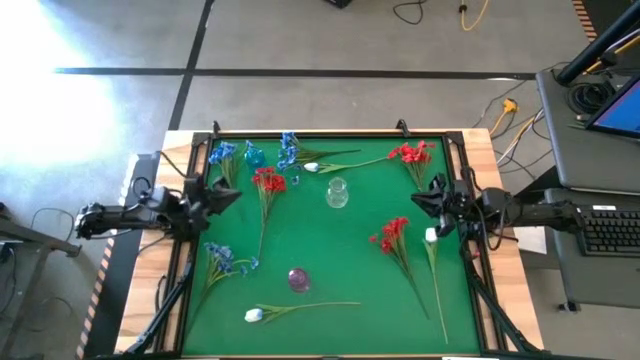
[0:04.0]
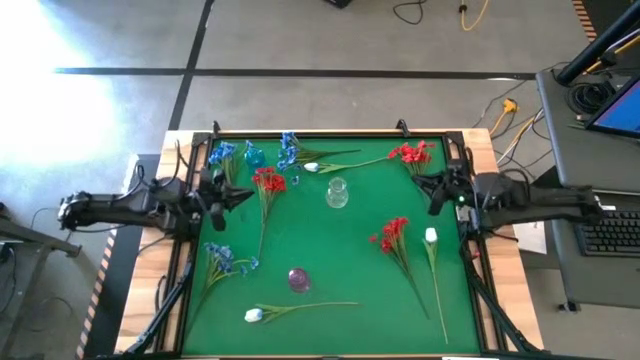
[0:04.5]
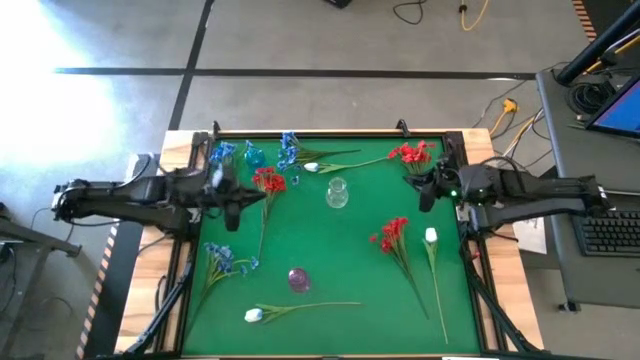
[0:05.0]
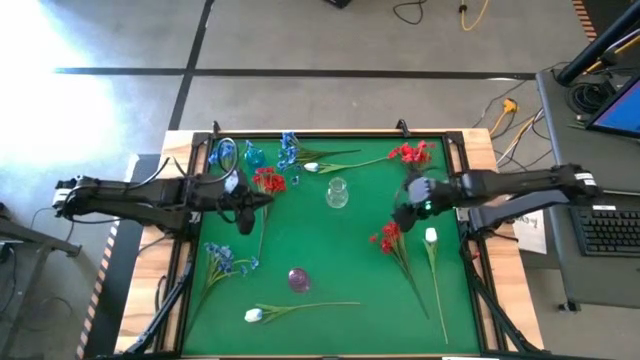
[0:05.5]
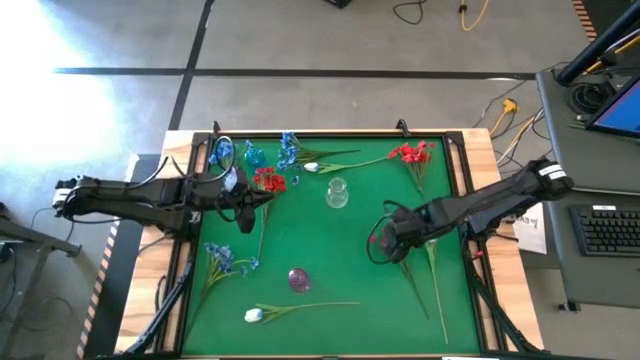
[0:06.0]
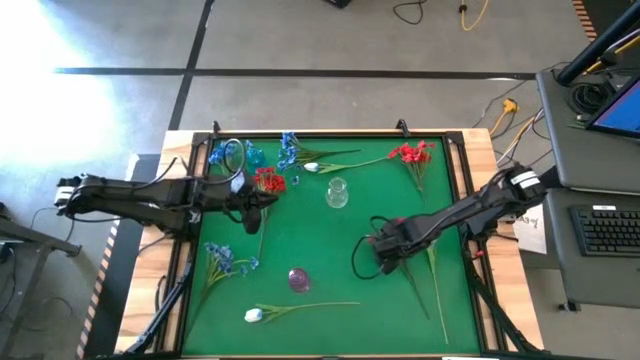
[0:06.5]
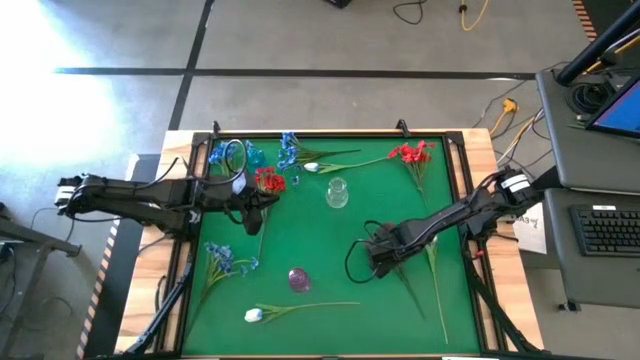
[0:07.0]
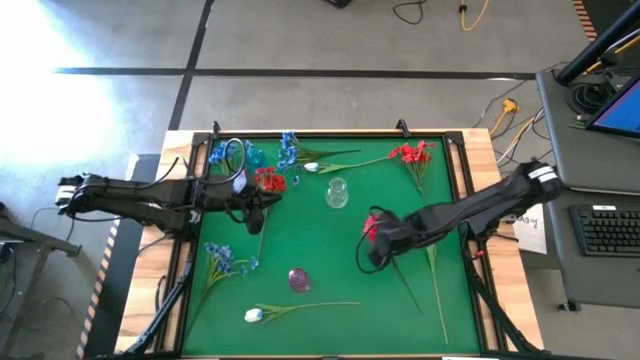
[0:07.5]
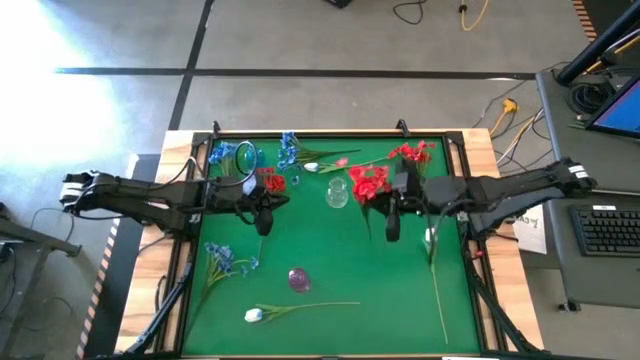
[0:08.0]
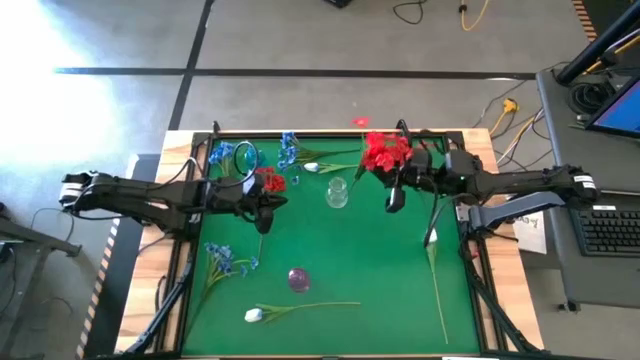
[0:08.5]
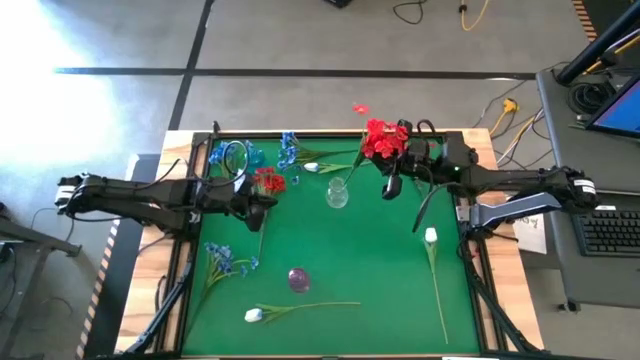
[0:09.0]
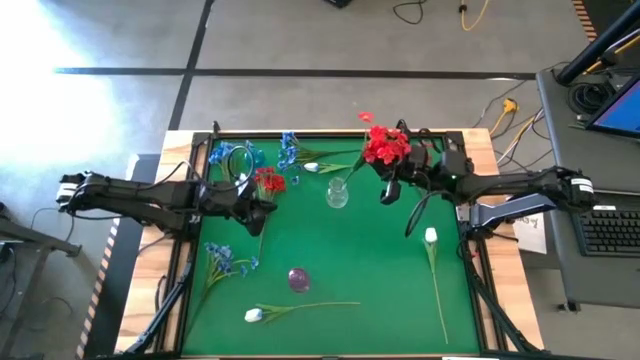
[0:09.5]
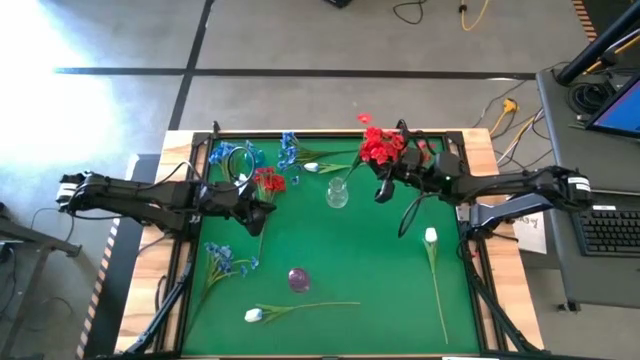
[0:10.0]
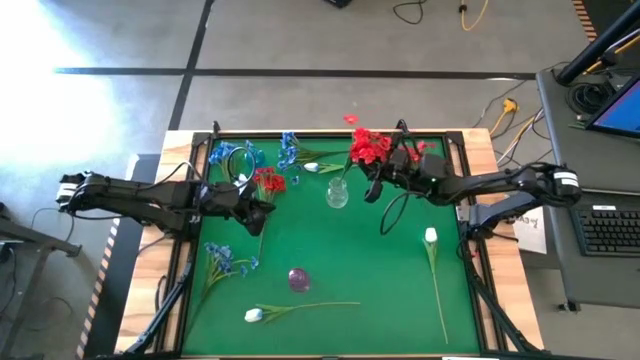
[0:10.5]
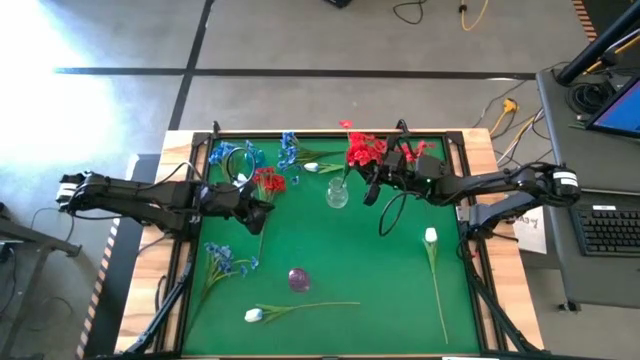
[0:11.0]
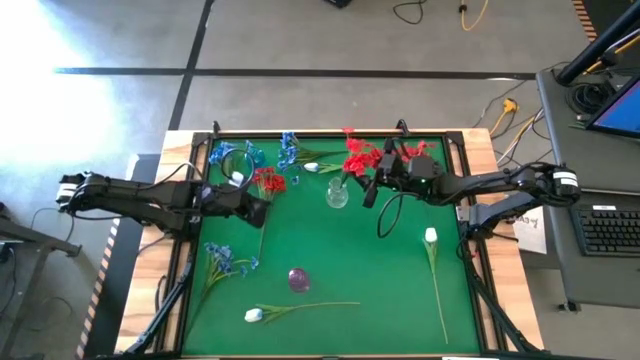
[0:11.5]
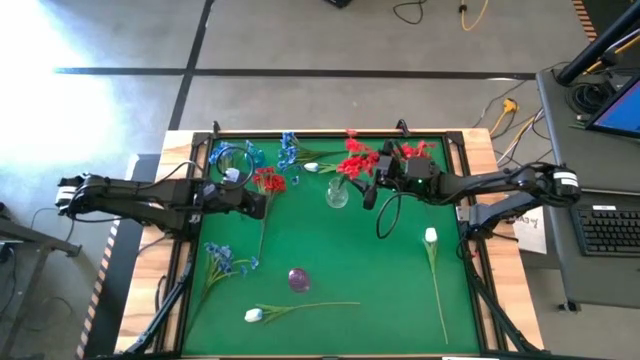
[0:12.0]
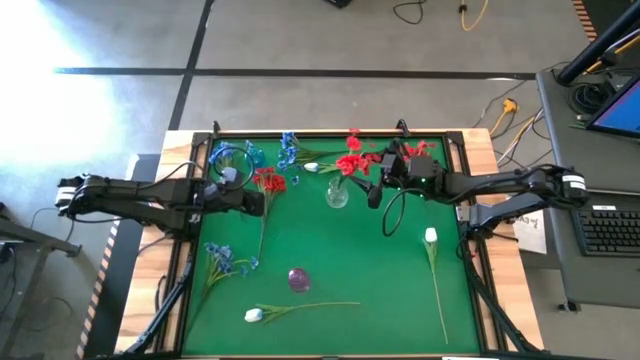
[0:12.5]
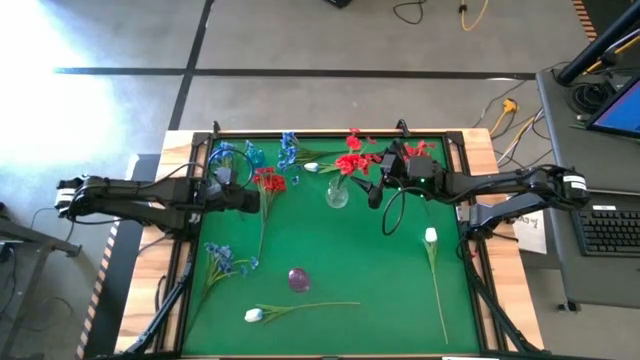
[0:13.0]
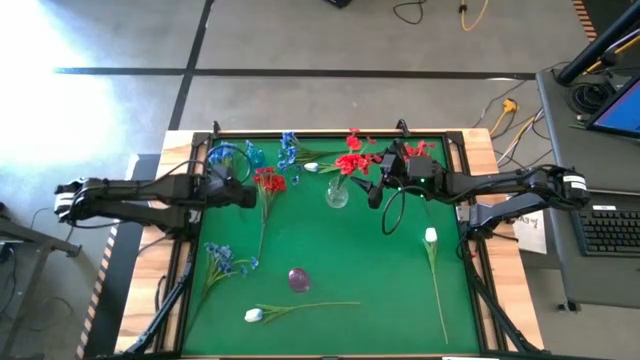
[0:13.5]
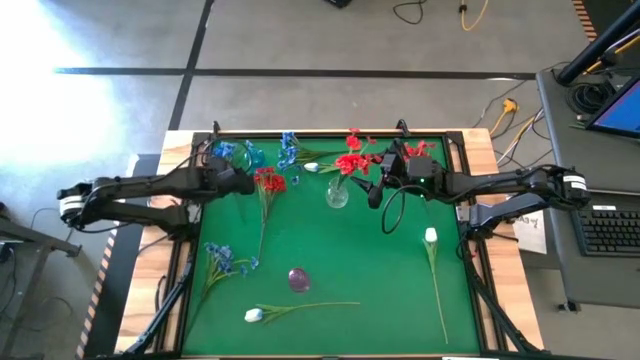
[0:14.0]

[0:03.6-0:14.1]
Task: Sort flowers into vase by color
Put the bottom red flowers into the transparent vase

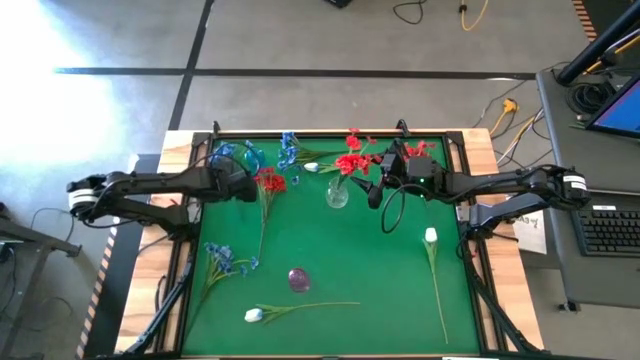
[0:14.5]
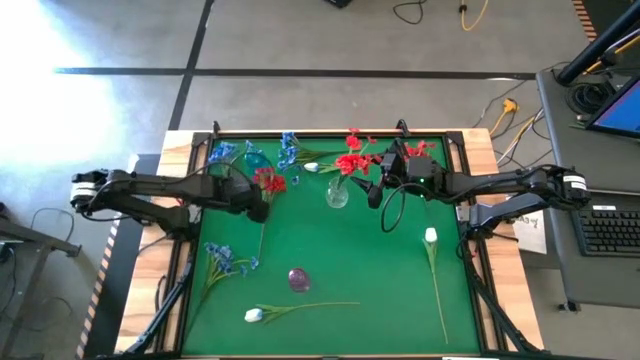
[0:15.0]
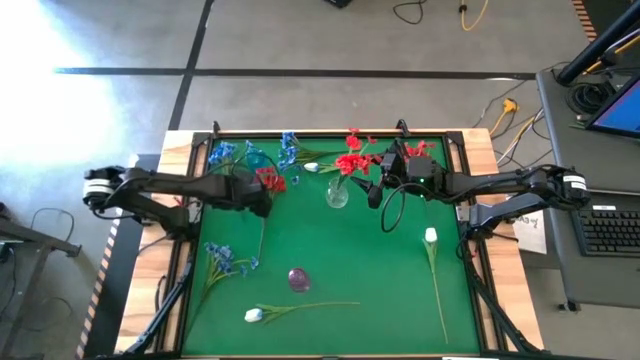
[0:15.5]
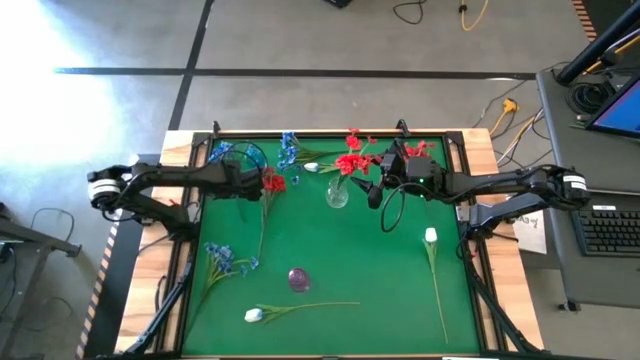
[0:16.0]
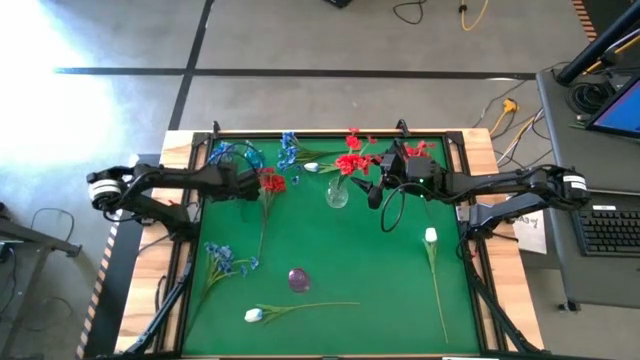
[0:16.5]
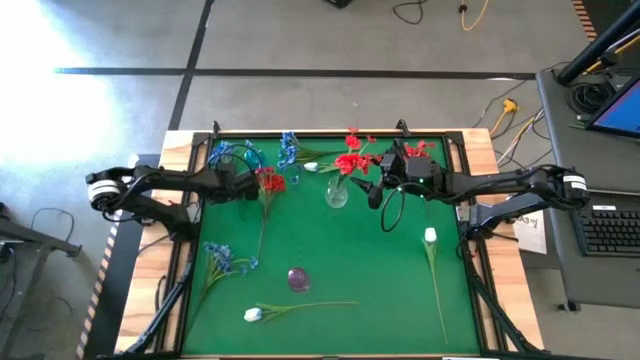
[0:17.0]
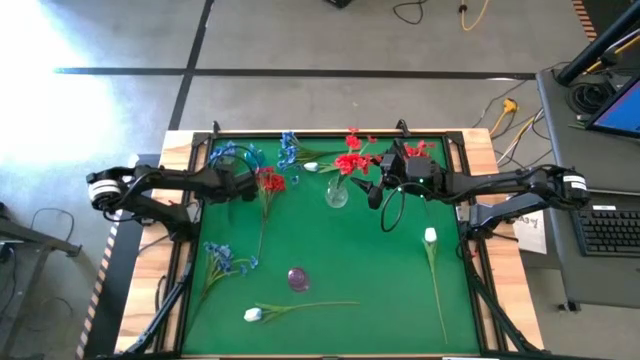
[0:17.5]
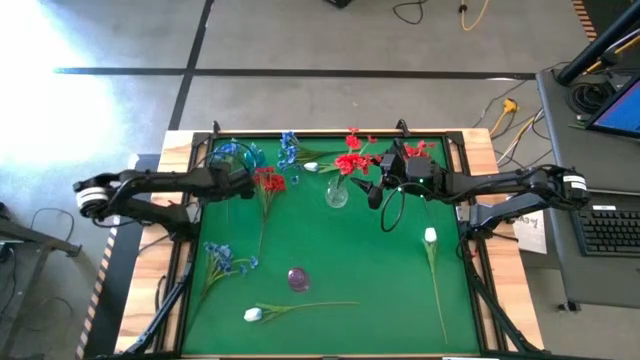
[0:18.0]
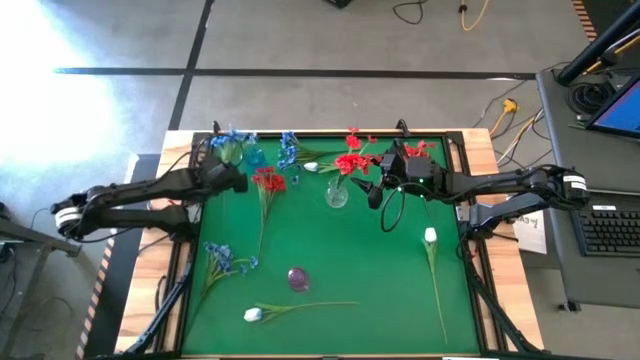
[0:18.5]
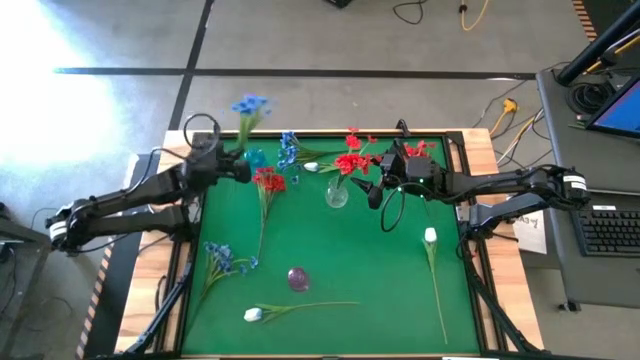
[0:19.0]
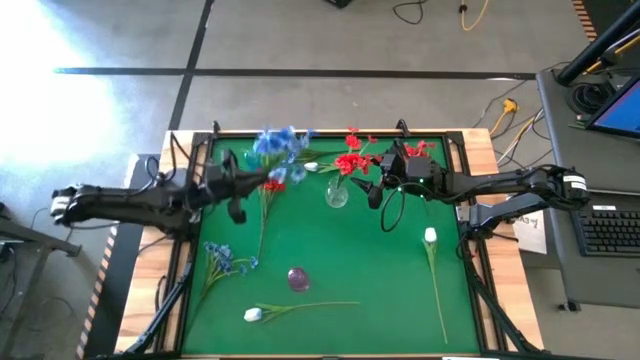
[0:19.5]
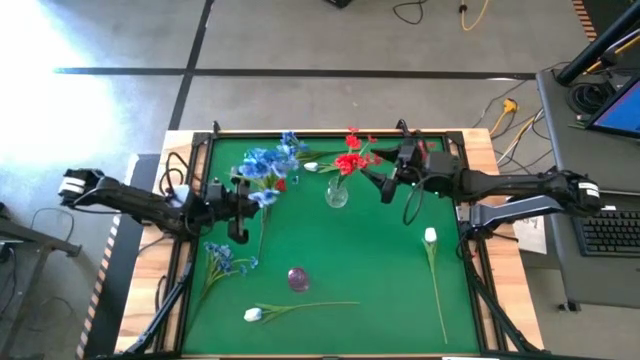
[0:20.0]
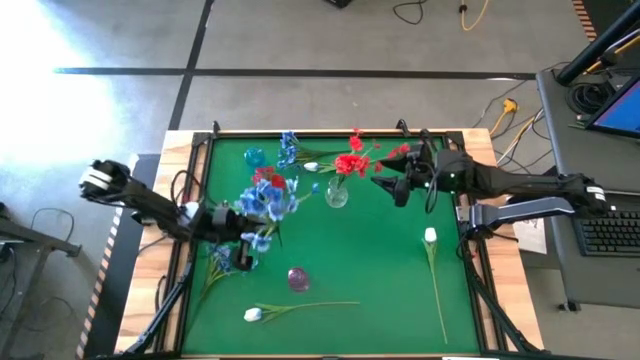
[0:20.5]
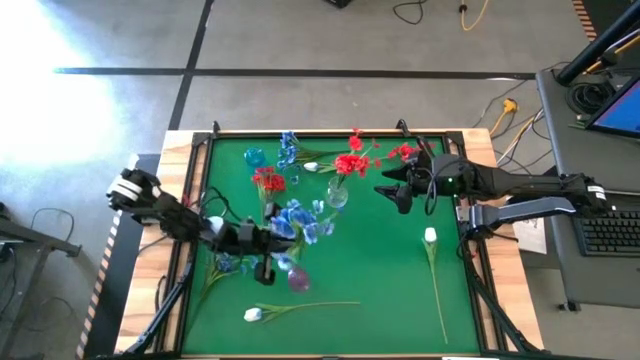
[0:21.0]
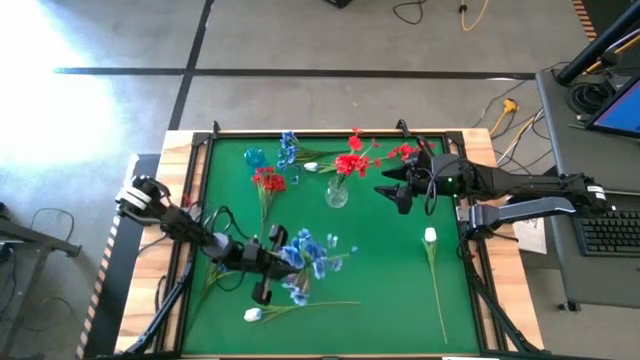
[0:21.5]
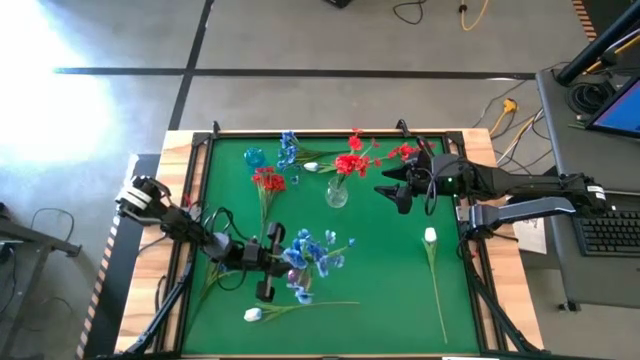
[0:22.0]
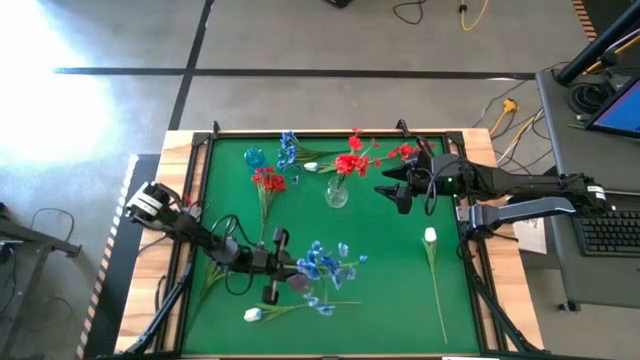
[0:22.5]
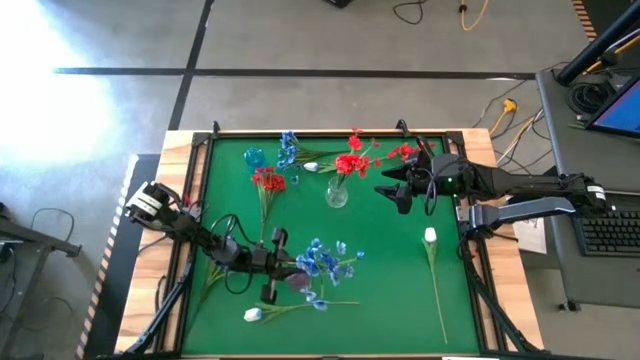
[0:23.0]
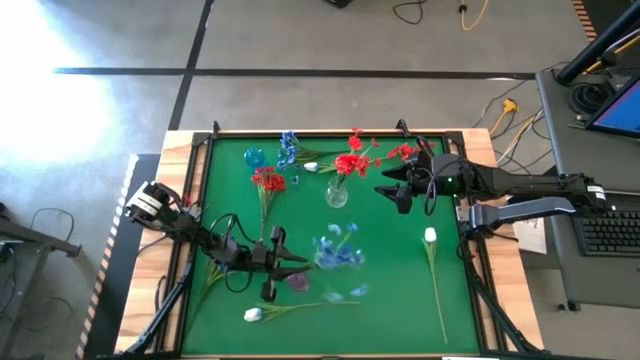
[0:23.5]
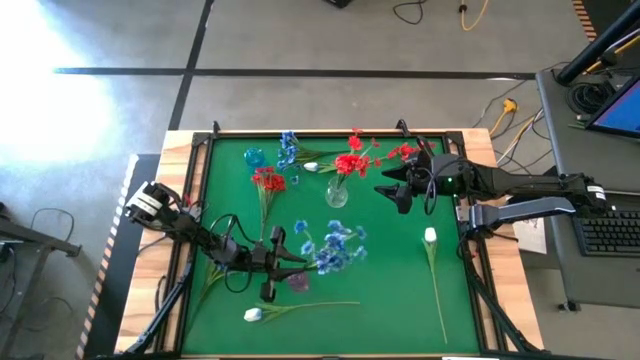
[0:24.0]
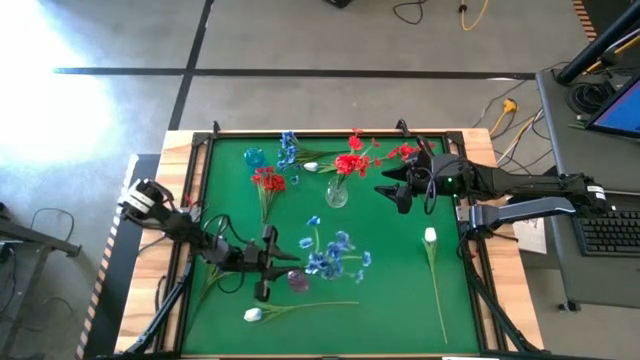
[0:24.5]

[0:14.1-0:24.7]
Put the top left blue flowers into the bottom violet vase

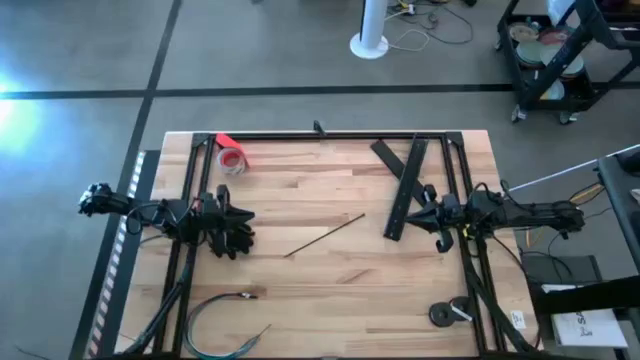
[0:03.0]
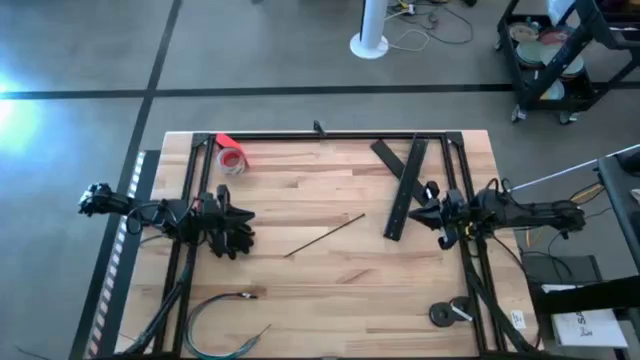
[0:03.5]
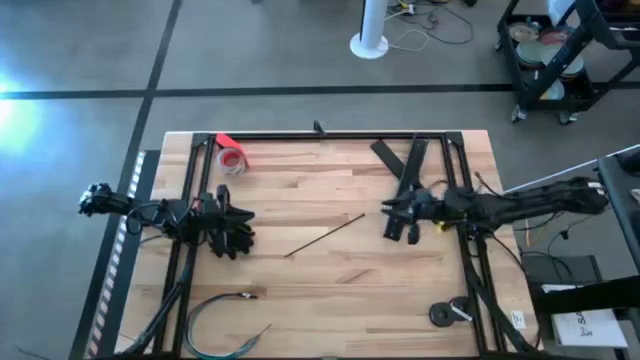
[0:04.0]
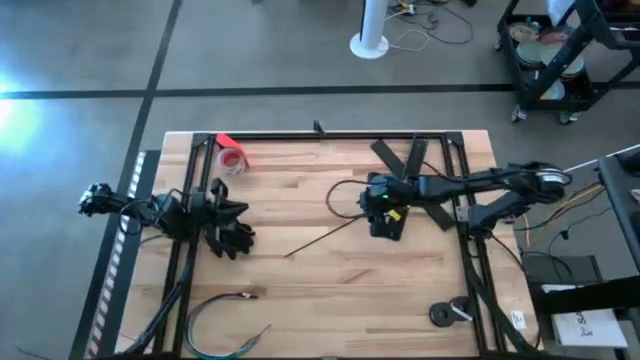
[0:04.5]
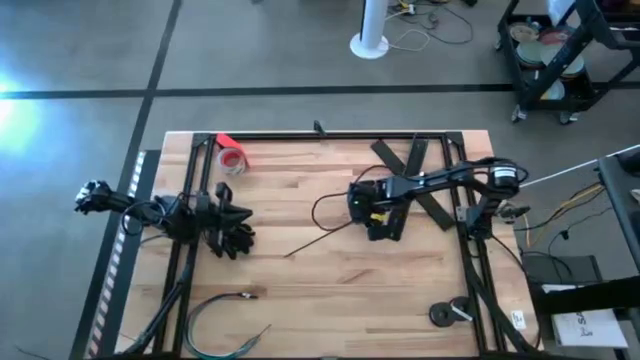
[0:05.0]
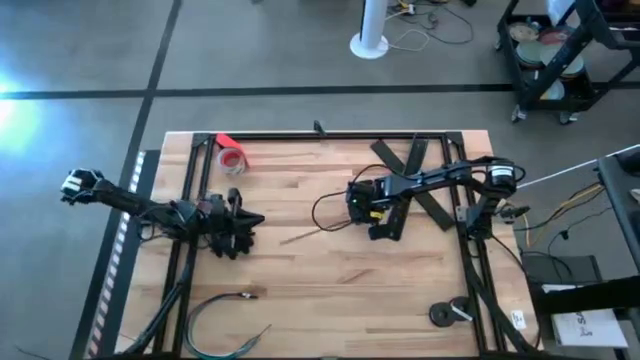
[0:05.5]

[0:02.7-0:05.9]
Task: Ziptie cables
Wrap the zip tie around the cable bundle
